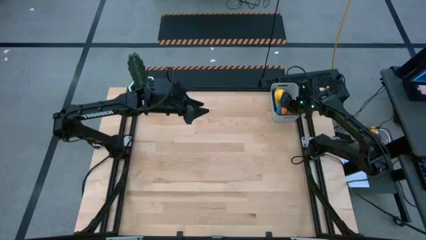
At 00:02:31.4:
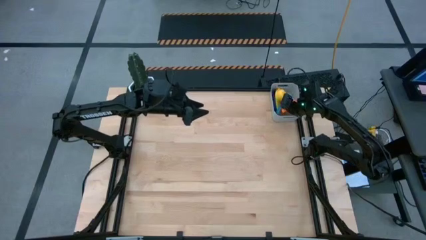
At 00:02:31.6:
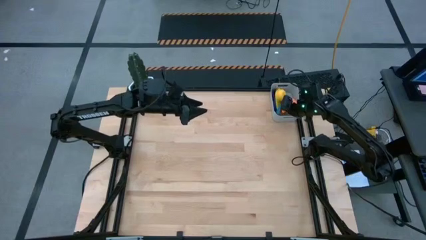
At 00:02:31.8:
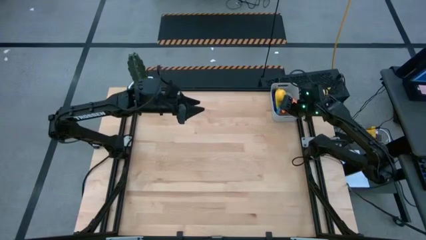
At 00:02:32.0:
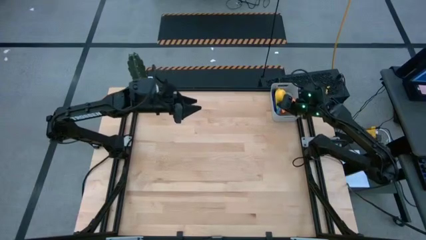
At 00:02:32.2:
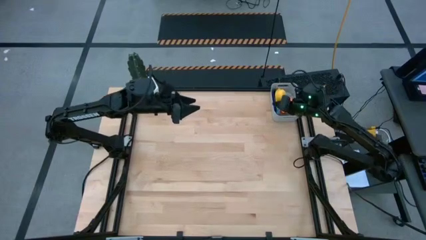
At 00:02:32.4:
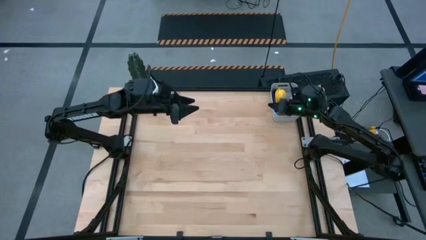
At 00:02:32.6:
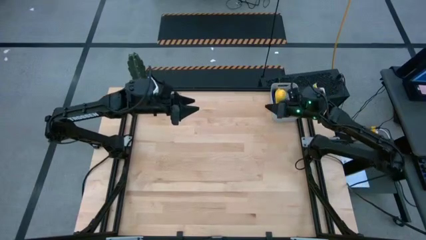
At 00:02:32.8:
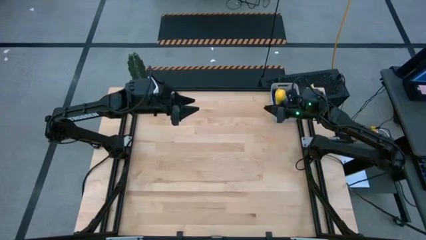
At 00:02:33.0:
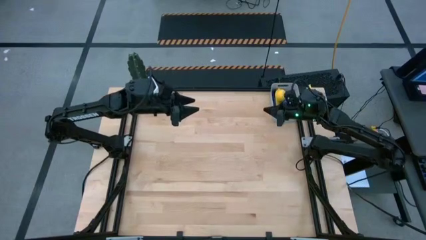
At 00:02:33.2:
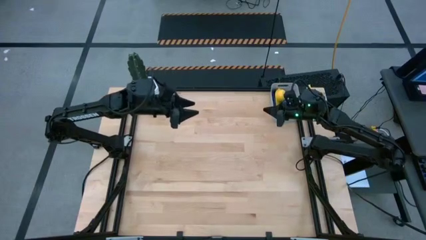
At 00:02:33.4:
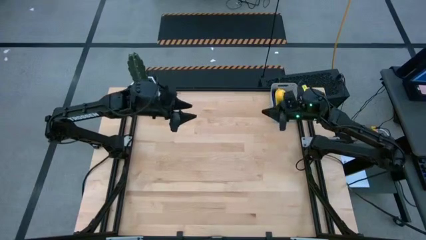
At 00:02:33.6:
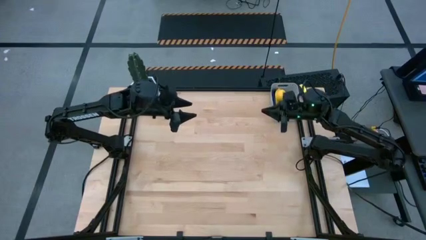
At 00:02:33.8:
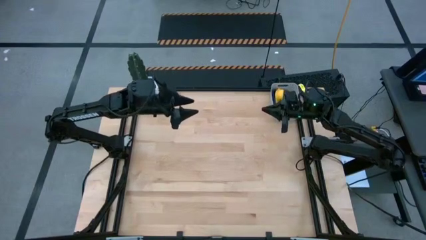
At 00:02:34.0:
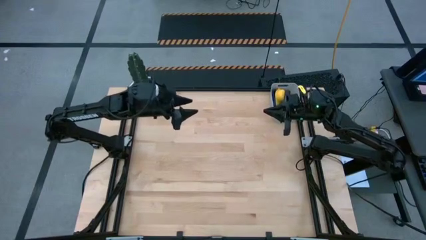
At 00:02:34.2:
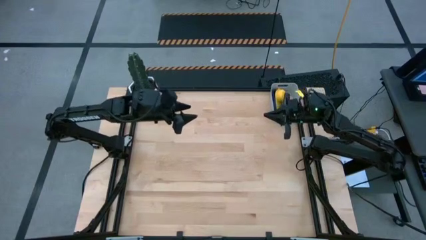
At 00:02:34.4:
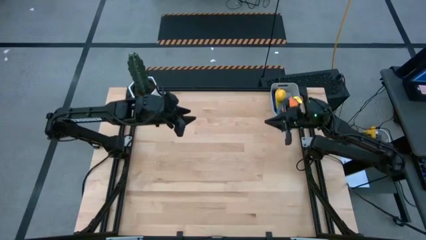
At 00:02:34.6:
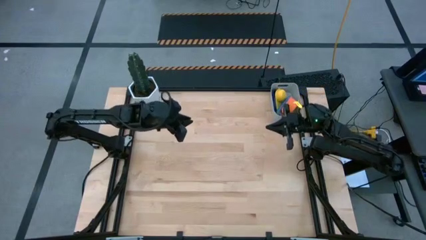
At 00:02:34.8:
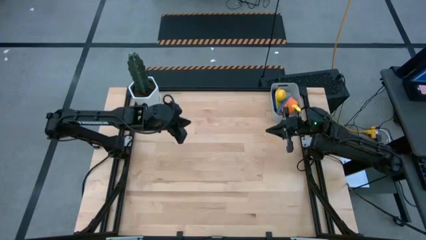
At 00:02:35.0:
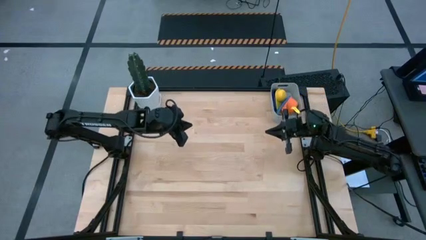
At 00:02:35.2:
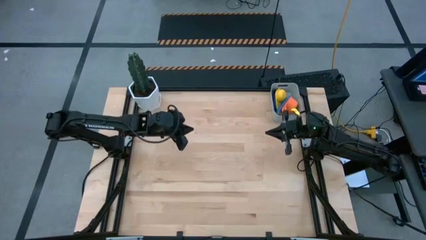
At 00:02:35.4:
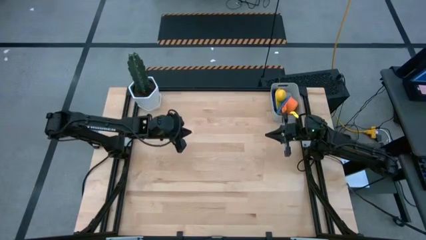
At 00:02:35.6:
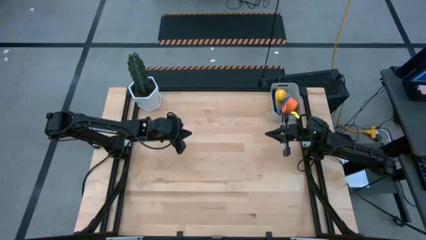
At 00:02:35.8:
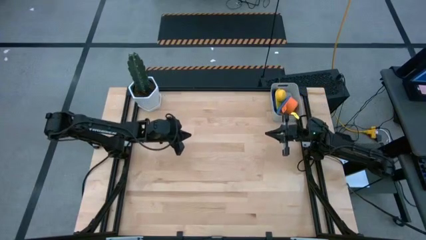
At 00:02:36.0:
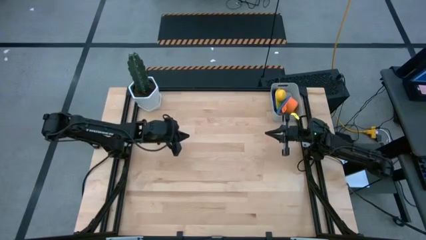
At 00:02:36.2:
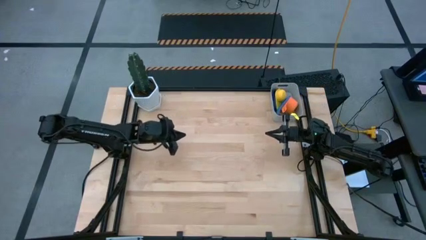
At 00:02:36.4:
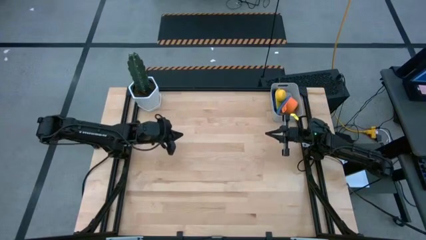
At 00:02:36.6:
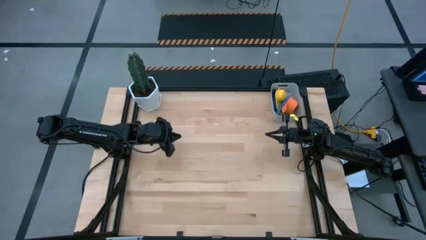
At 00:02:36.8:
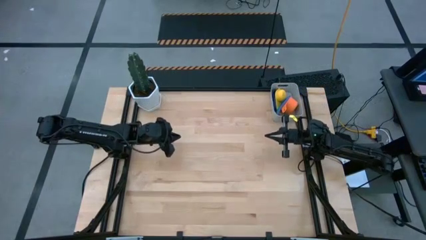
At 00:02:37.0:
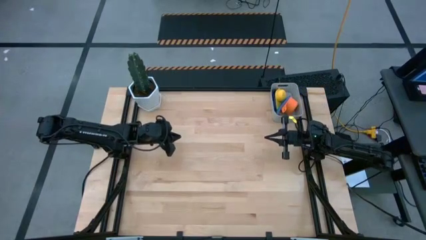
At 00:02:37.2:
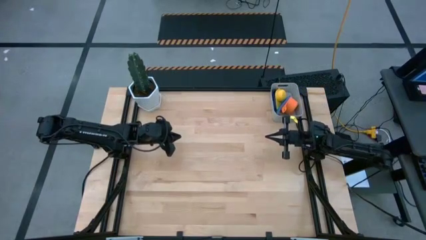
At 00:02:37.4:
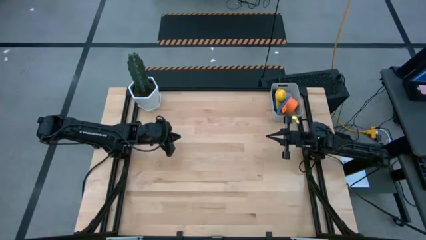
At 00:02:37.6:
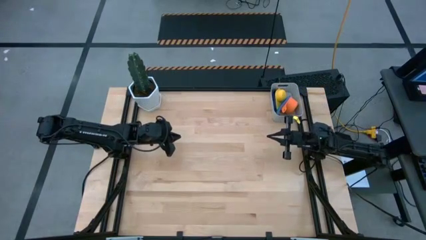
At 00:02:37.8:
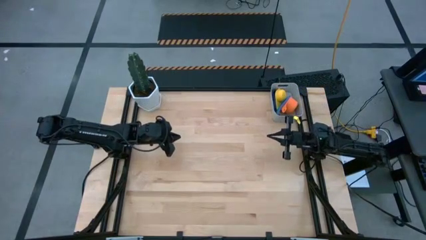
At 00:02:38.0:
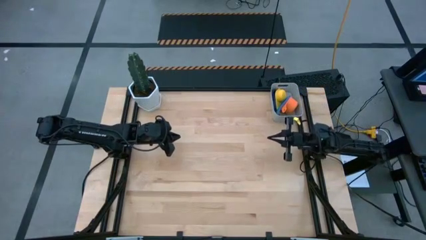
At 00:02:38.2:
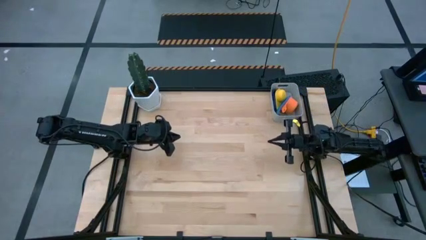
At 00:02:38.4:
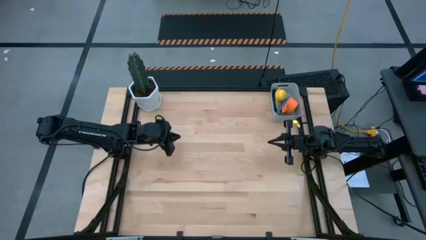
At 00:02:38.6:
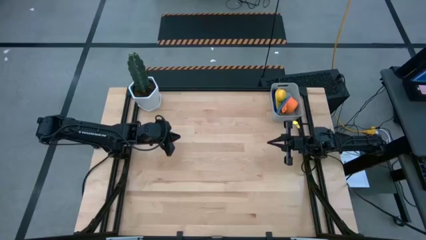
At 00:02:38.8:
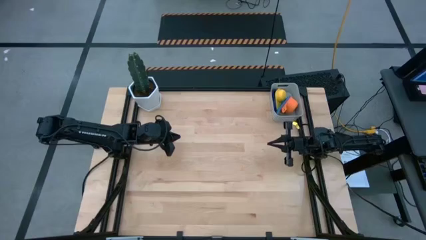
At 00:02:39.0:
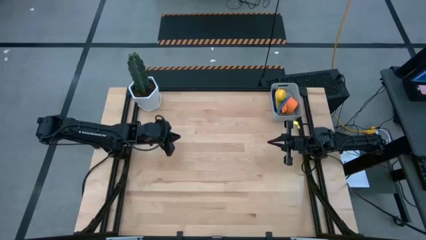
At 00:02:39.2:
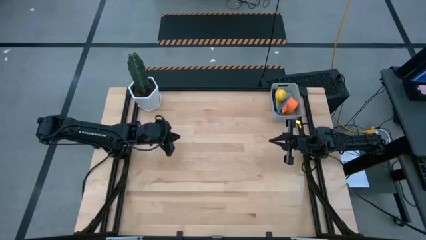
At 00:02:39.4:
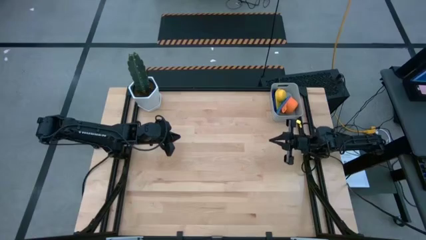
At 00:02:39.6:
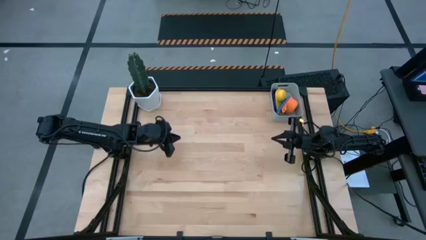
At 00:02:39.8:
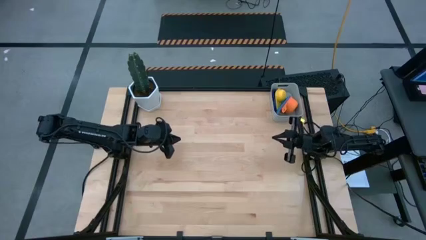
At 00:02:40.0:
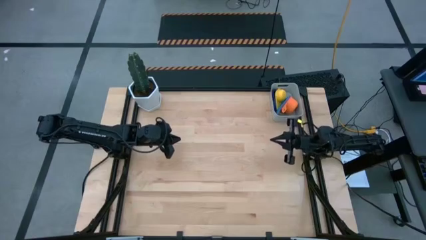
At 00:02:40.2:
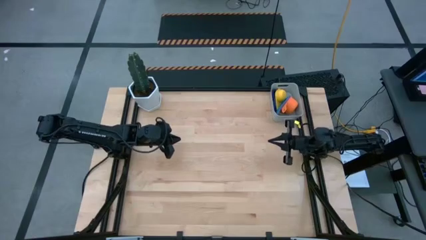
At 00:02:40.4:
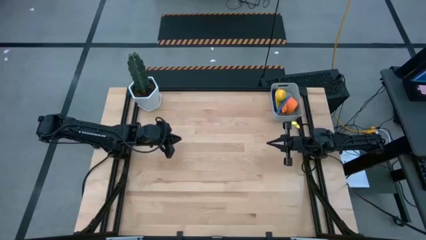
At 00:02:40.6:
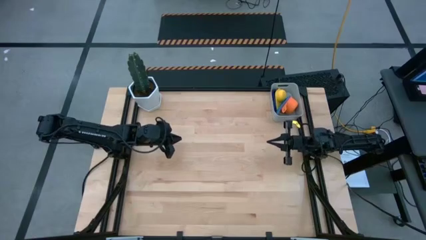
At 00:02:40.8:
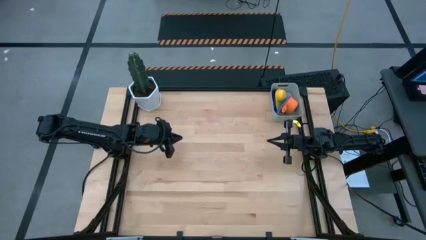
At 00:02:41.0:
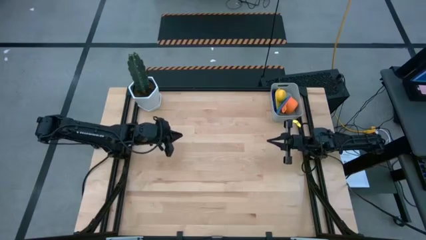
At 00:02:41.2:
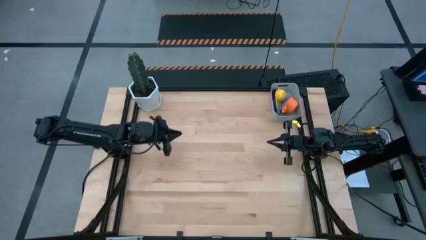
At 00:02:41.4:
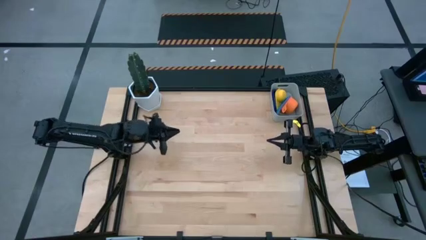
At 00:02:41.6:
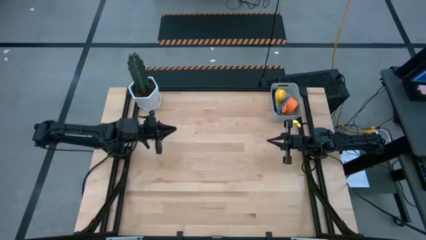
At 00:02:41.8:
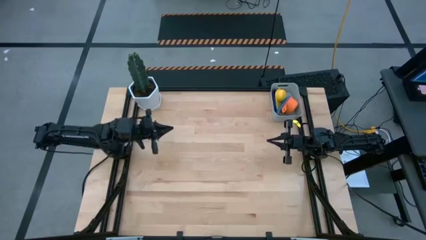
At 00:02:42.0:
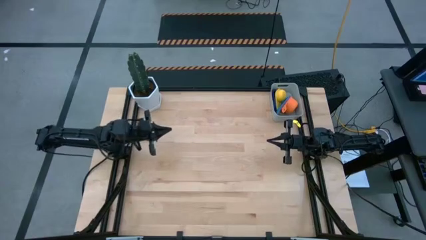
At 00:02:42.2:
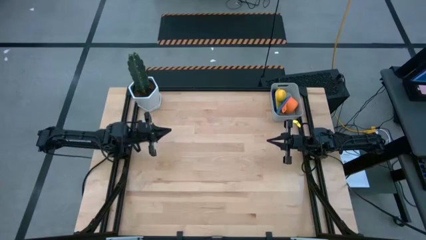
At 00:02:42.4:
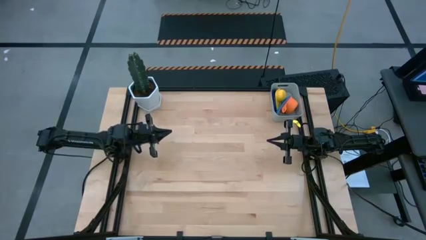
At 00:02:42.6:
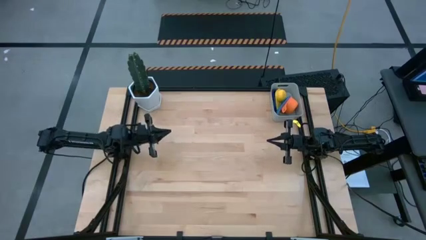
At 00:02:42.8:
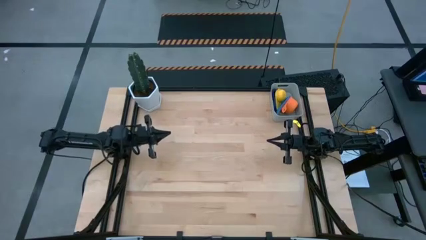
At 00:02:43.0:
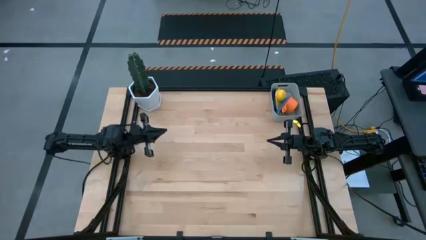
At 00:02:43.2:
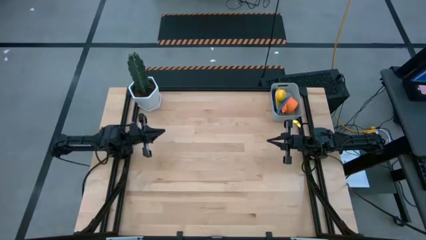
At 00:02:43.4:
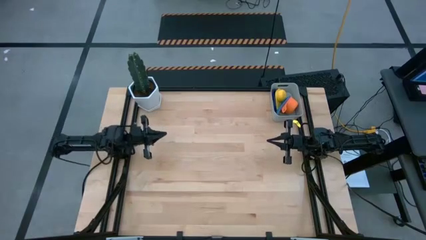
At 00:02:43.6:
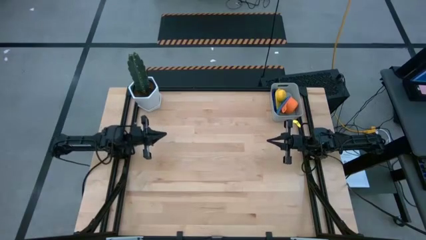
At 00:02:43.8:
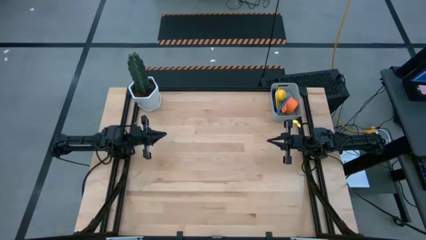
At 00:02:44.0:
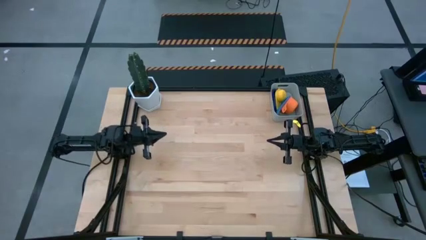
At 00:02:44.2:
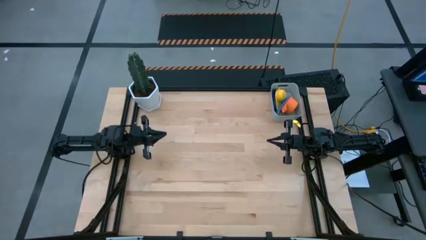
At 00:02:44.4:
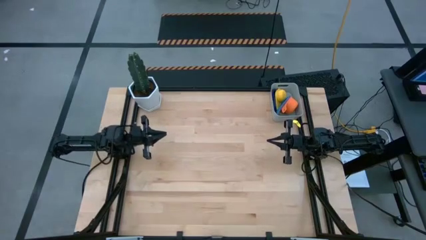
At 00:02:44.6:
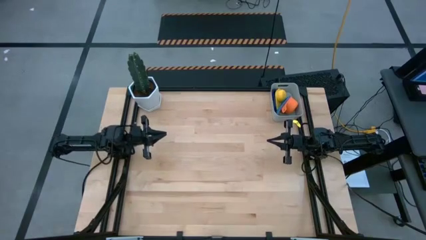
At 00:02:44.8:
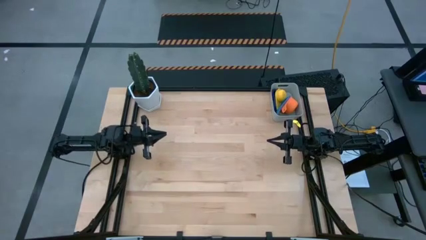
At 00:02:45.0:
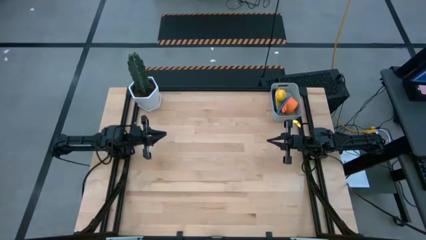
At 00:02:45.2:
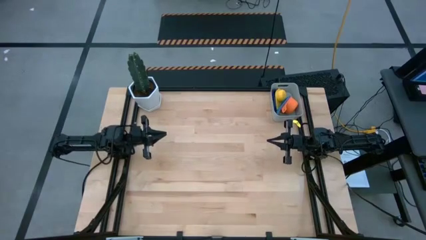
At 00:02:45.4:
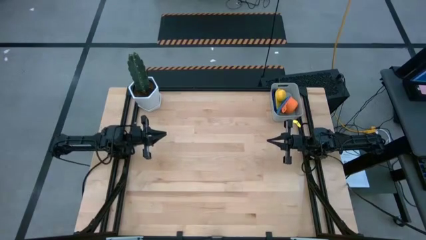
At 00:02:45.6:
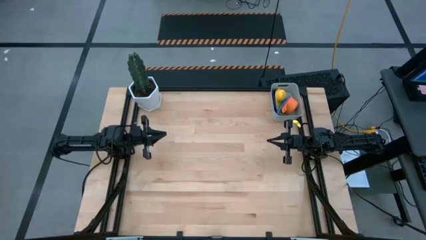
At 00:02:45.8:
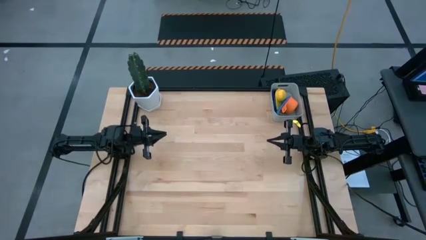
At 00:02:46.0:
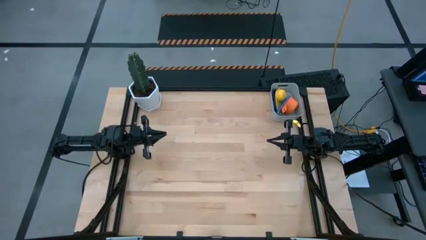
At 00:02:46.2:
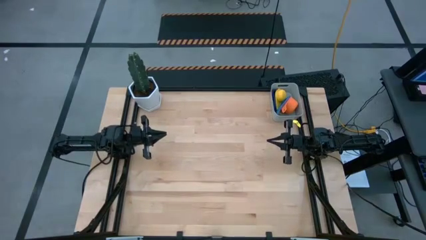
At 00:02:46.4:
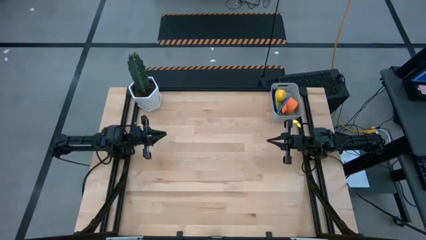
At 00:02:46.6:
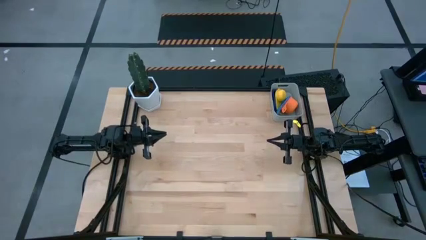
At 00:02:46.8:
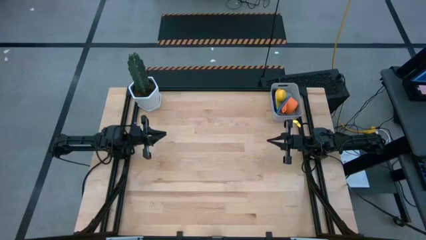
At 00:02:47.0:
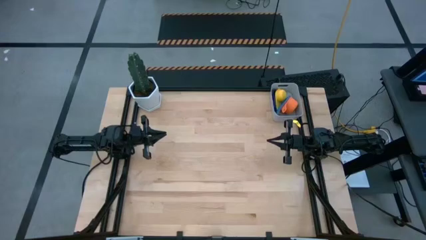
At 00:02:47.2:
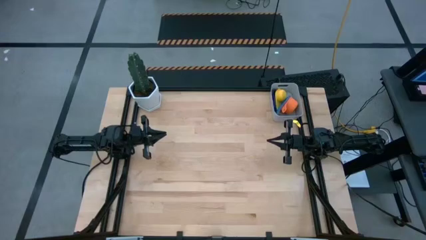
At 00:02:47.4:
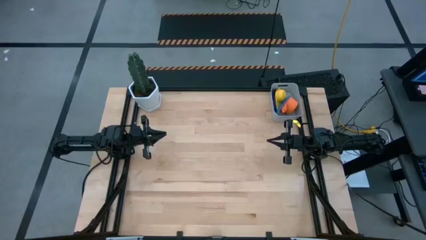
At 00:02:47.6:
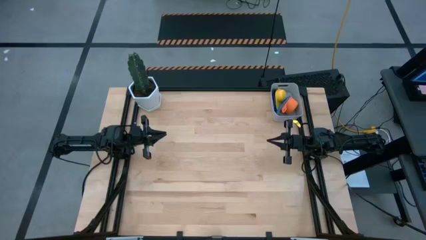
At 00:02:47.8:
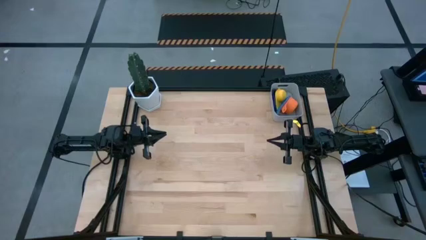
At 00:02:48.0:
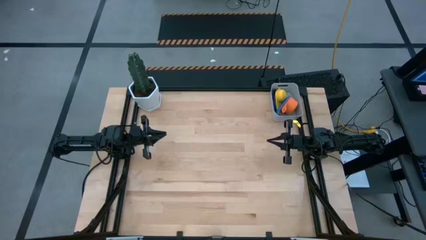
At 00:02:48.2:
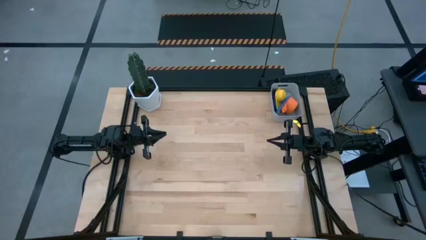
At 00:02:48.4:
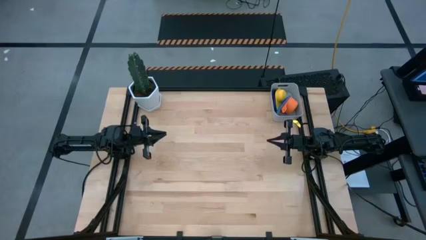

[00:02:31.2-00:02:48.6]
Task: Nest measuring cups in basket
Return to Home Position
